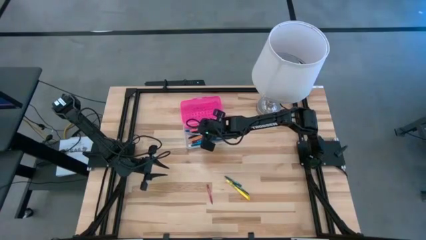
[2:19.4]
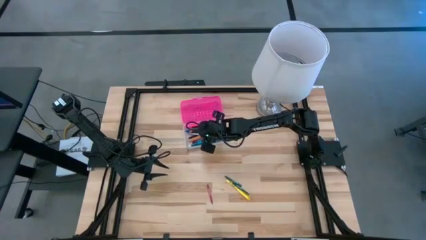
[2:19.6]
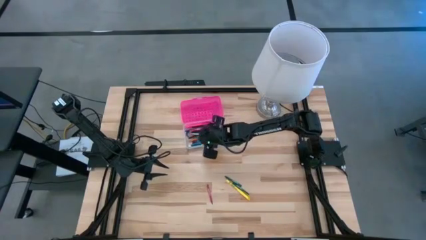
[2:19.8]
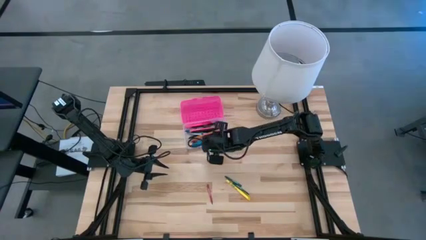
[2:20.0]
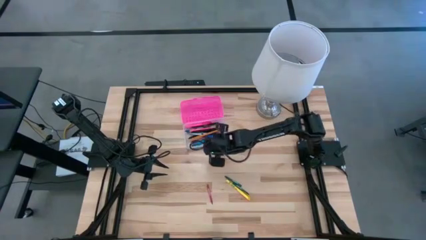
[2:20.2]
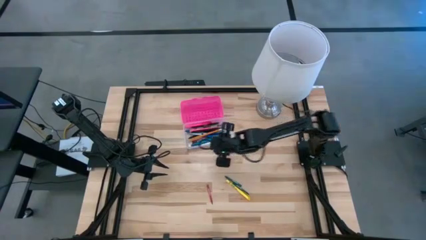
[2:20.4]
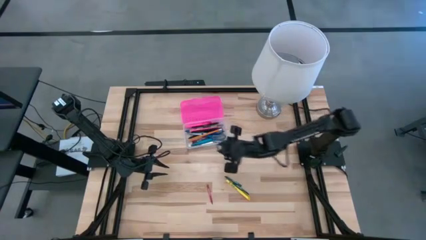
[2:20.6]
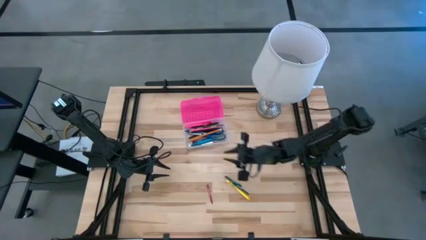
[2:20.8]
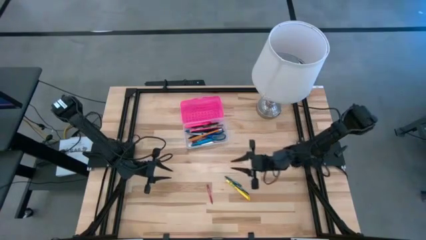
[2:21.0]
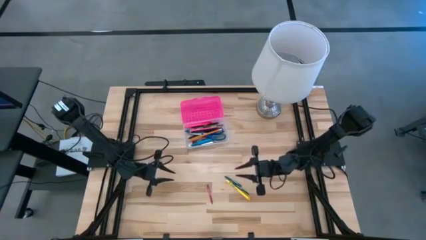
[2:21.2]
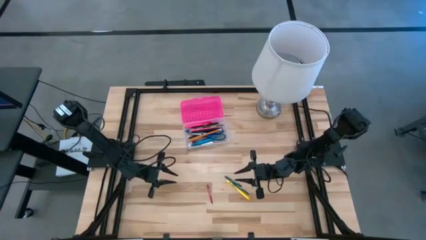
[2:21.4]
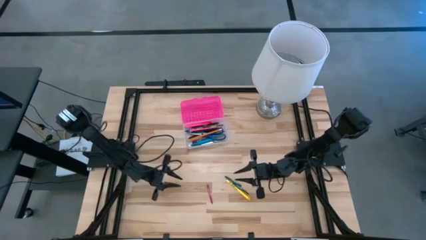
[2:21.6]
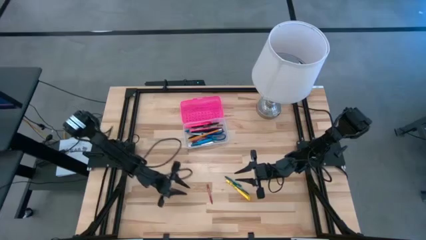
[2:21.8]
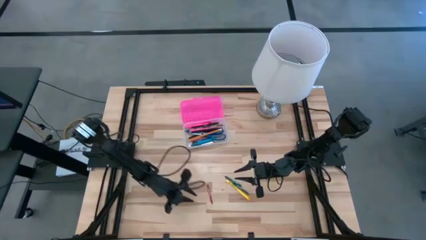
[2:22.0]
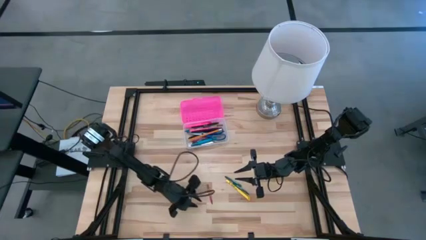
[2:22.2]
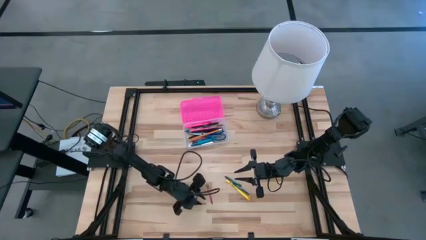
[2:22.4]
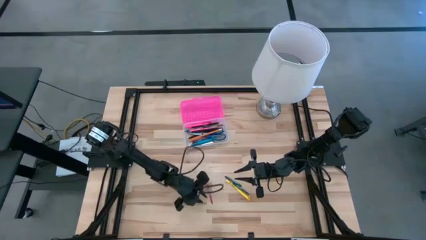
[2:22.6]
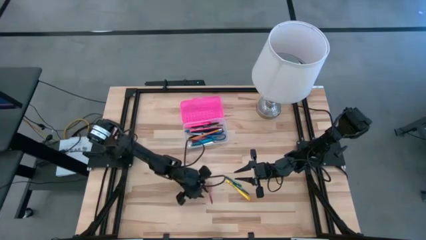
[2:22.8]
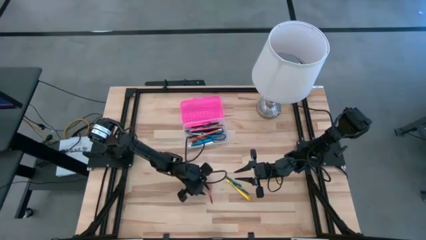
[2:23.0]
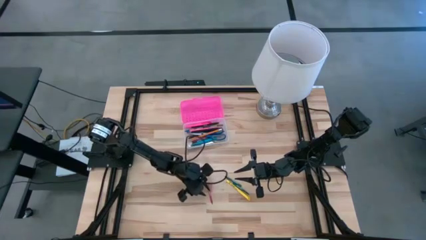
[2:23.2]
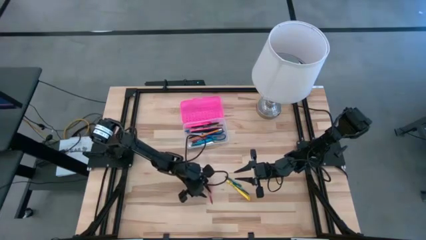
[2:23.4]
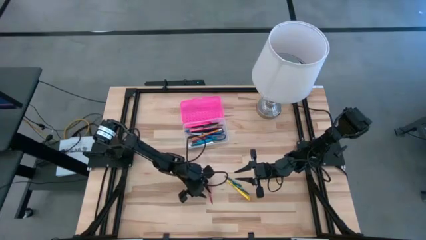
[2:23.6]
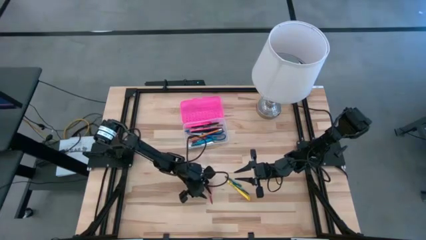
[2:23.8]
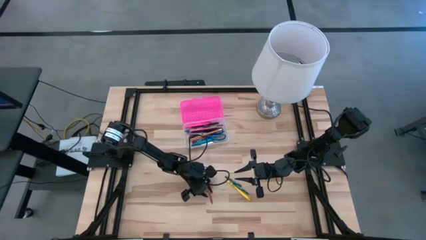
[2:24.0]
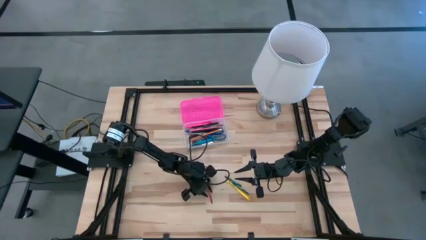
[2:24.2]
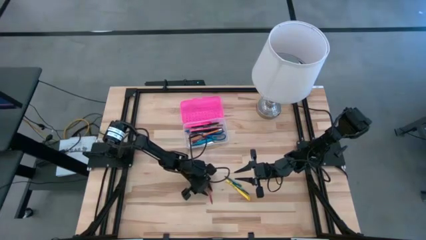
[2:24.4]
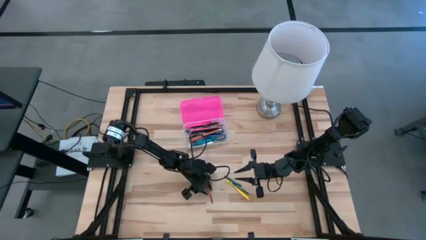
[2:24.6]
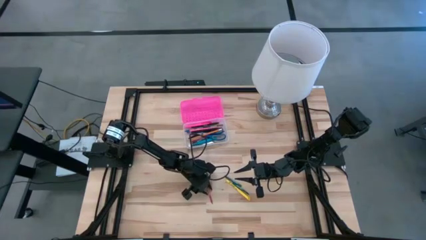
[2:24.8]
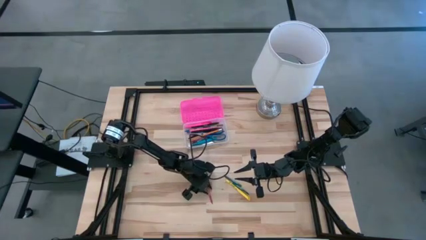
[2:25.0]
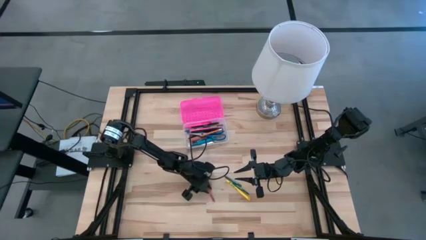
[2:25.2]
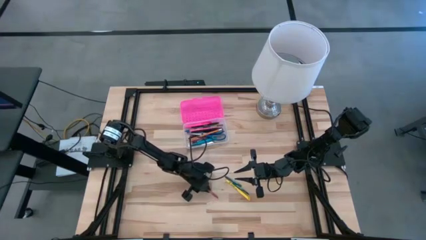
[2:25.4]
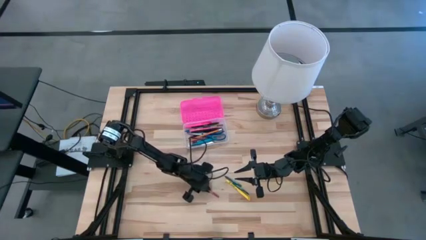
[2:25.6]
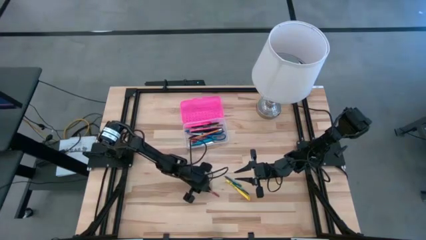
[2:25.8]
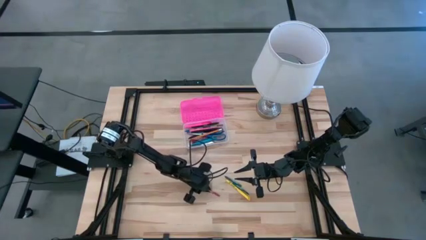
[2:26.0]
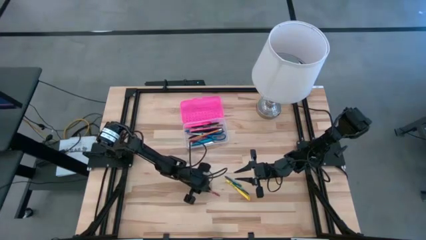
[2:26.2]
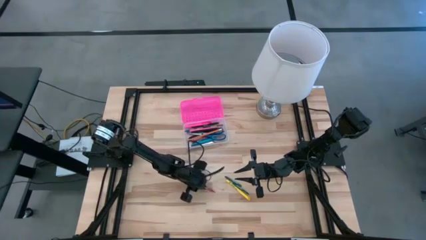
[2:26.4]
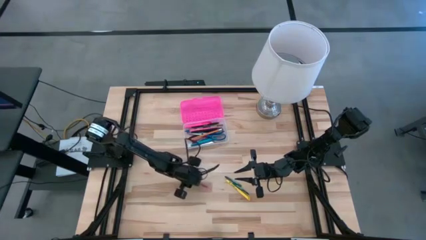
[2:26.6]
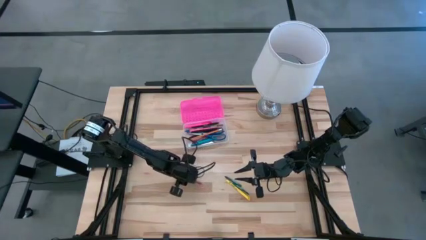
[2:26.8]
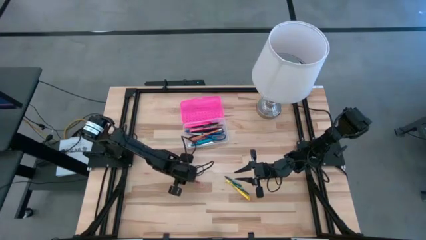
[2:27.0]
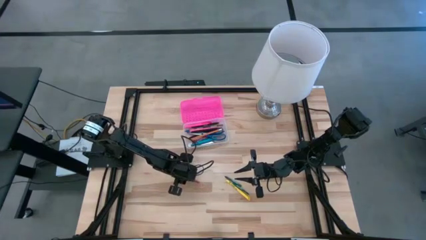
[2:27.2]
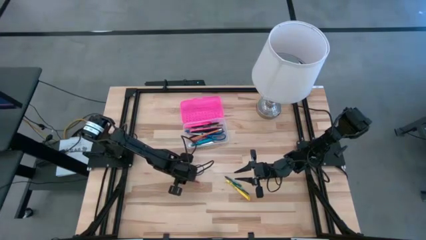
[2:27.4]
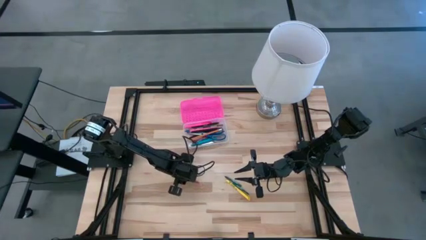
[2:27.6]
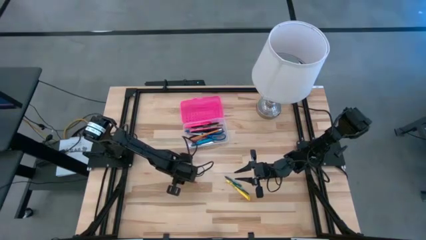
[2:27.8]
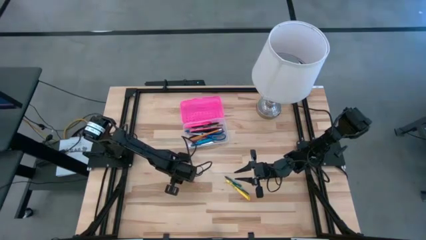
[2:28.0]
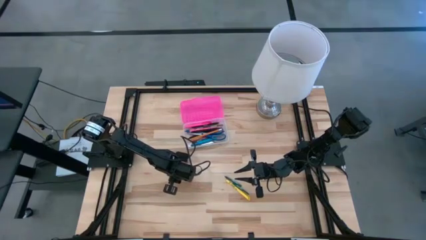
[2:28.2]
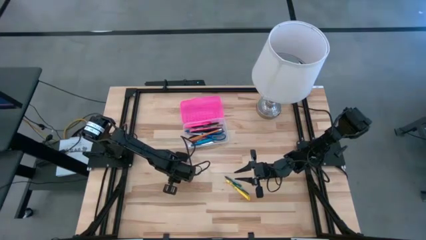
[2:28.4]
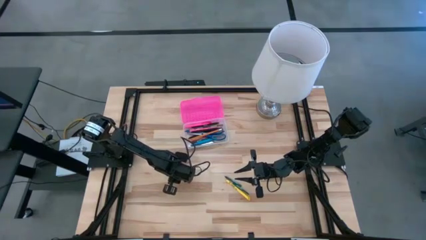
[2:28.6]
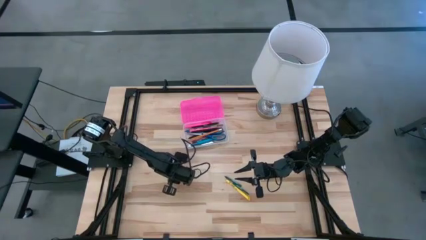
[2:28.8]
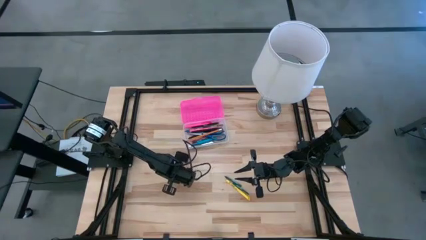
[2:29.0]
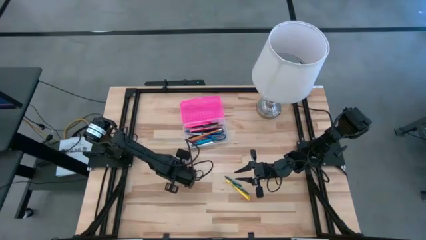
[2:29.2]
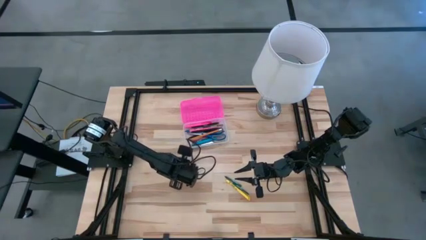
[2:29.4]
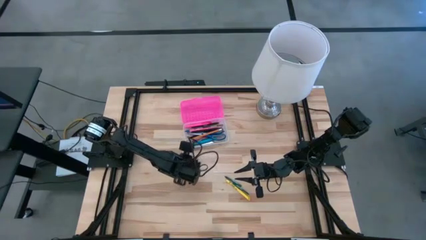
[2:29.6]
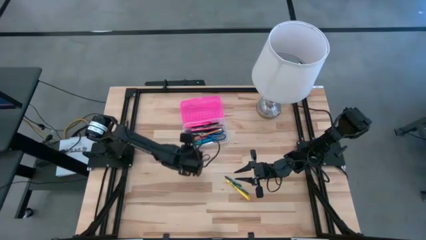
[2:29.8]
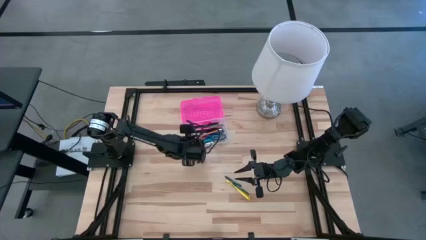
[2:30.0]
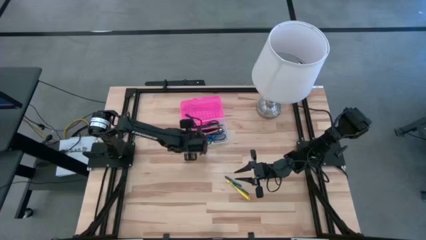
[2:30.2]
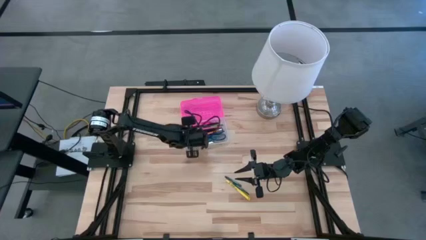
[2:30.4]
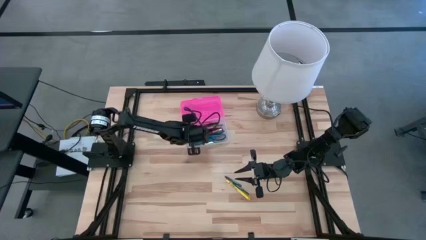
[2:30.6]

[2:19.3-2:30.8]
Task: Pick & place school supplies into a supply box
Put the red crayon into the pink supply box

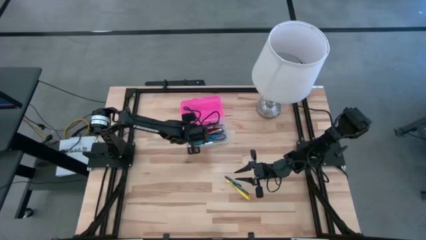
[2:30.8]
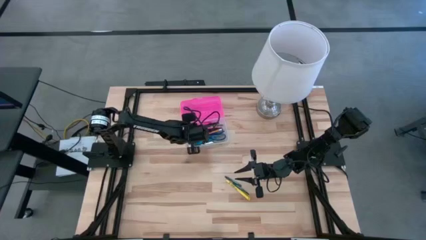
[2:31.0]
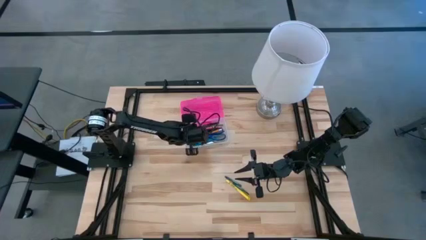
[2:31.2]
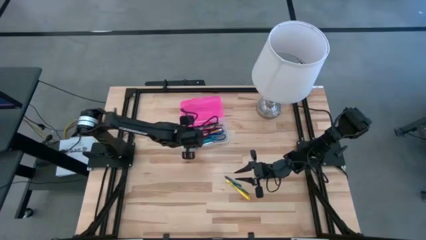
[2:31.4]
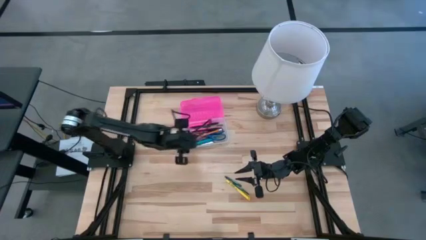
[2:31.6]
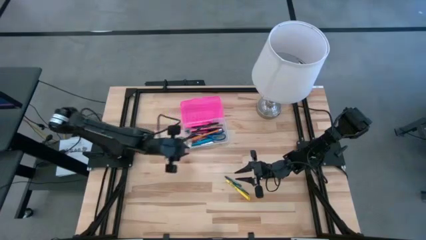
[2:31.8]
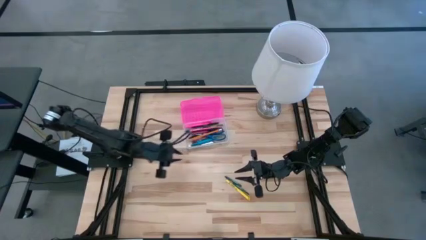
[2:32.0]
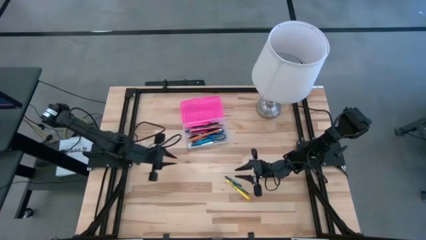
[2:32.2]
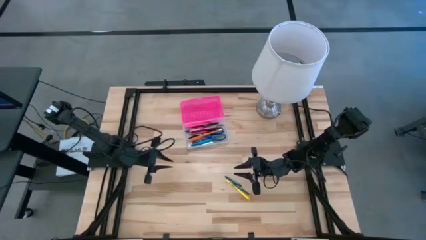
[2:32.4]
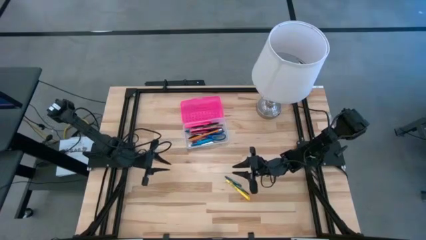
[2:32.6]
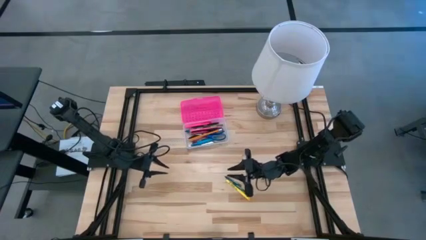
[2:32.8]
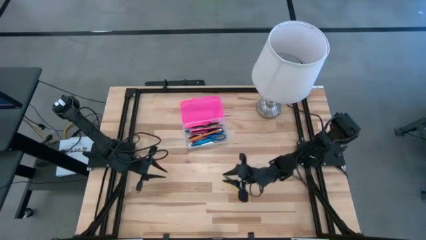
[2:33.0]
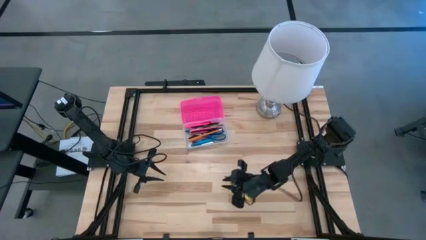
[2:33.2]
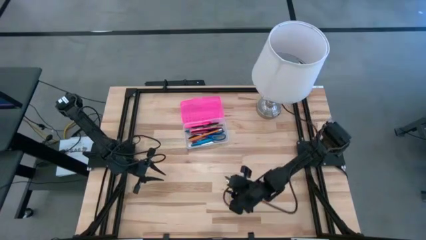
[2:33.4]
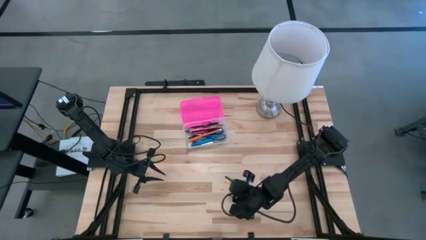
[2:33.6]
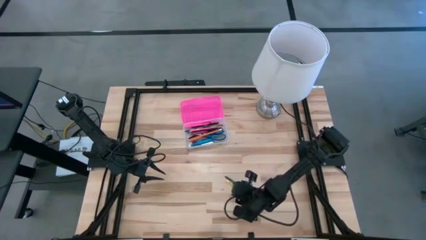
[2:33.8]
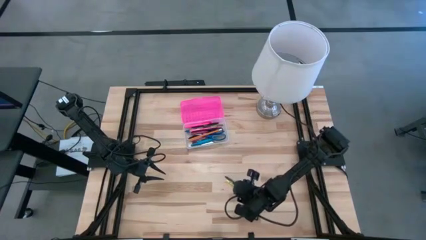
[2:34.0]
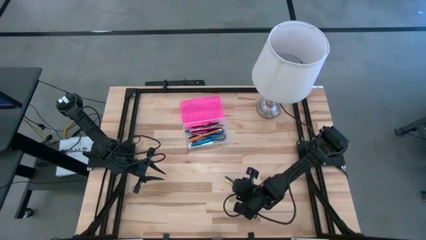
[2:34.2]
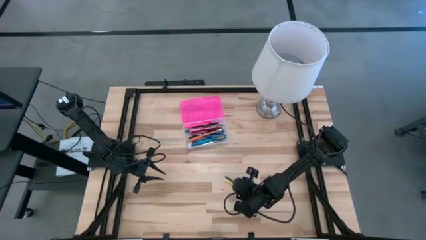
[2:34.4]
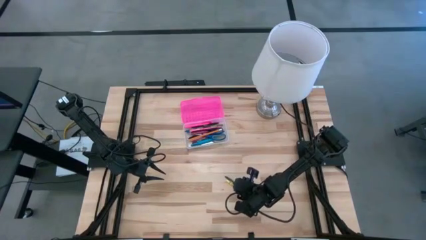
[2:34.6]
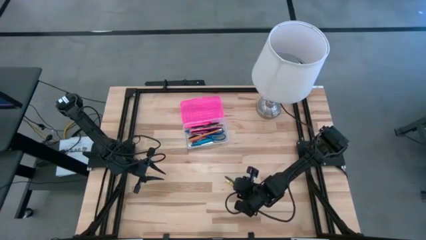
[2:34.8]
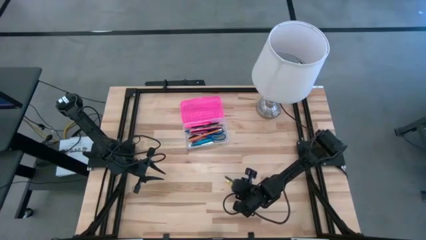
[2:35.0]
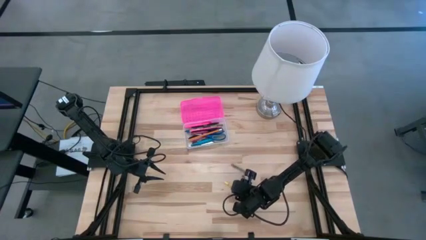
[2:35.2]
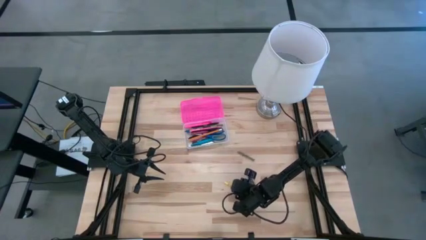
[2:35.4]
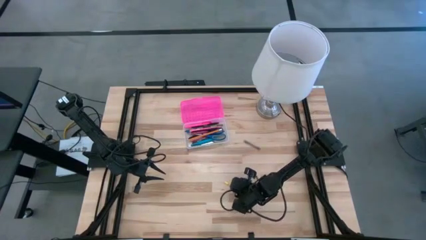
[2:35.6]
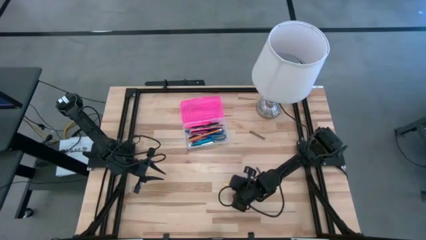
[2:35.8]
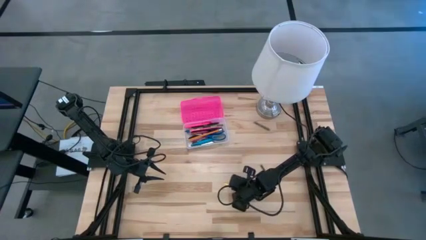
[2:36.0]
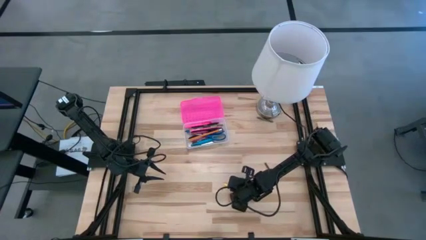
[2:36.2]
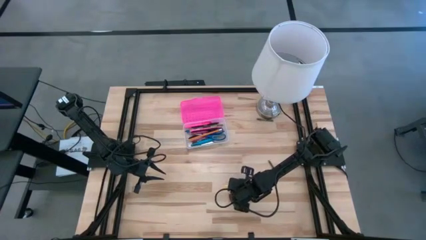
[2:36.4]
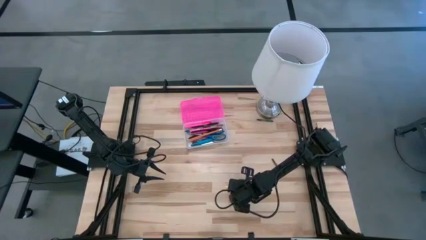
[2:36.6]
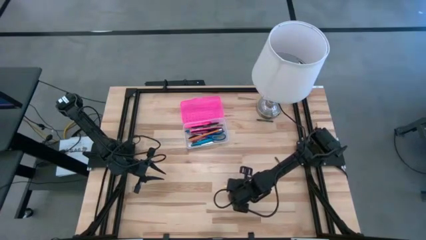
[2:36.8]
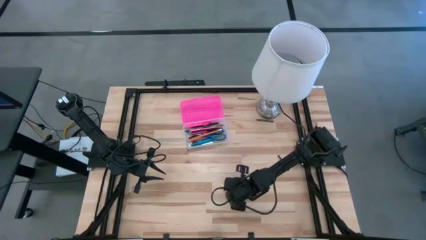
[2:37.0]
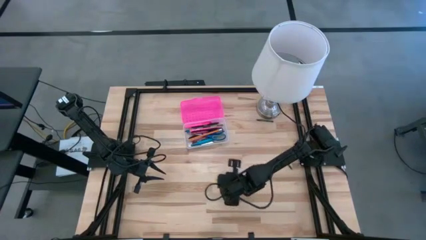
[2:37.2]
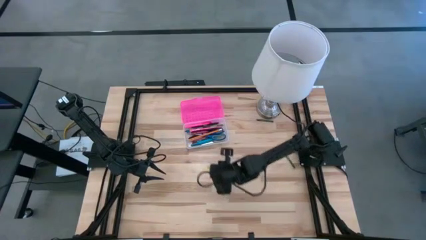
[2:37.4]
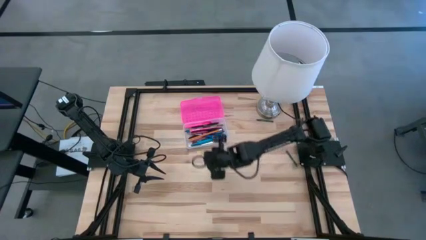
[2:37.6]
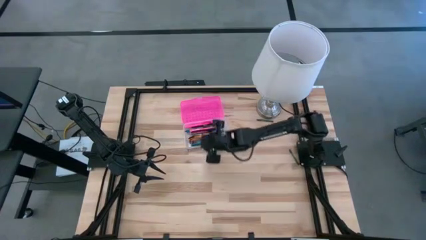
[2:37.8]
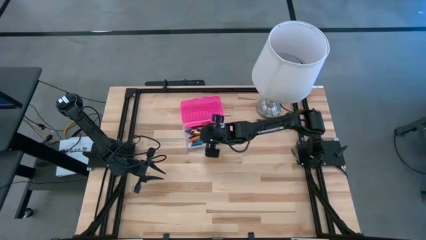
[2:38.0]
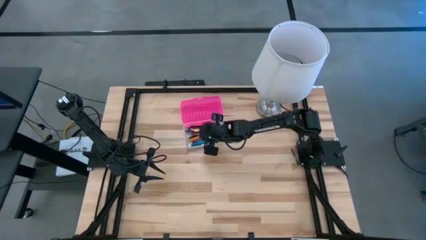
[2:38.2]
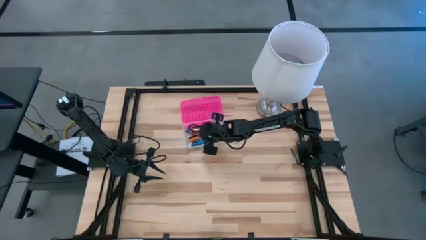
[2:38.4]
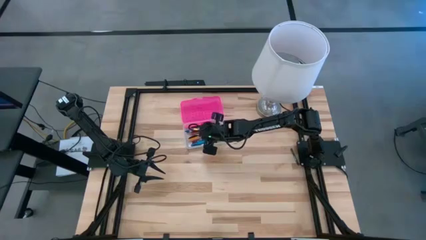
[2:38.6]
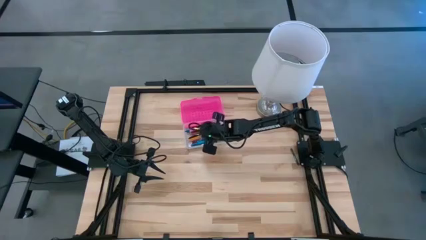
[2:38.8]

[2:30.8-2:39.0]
Put the yellow pen into the pink supply box
